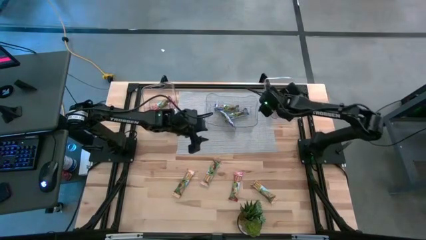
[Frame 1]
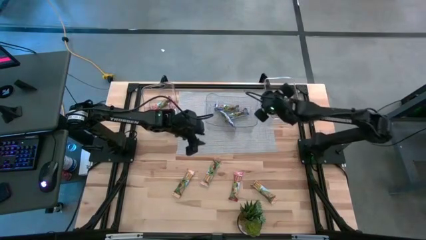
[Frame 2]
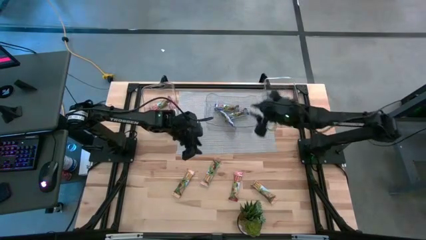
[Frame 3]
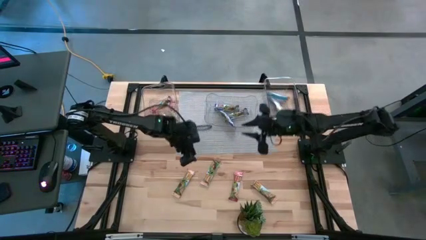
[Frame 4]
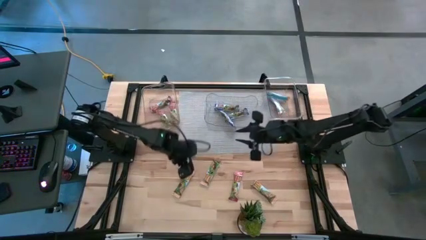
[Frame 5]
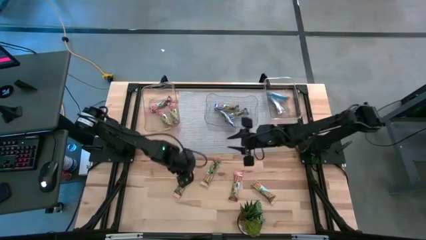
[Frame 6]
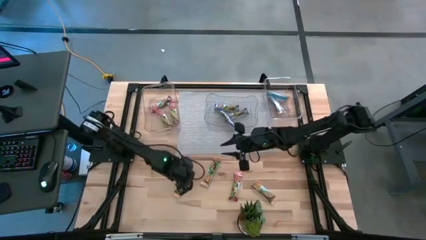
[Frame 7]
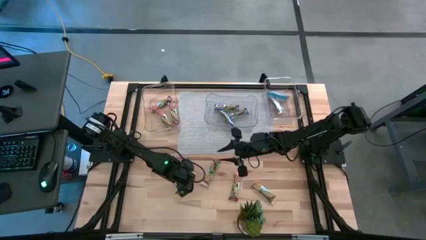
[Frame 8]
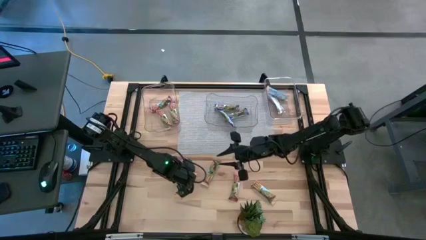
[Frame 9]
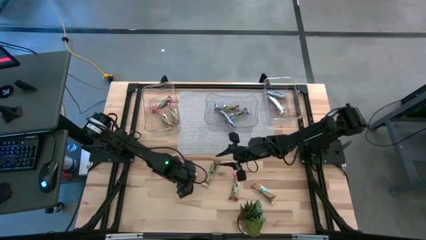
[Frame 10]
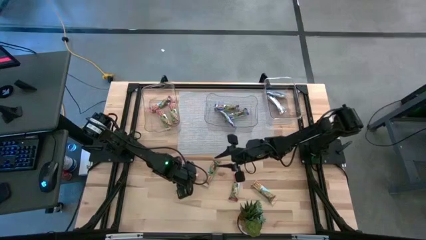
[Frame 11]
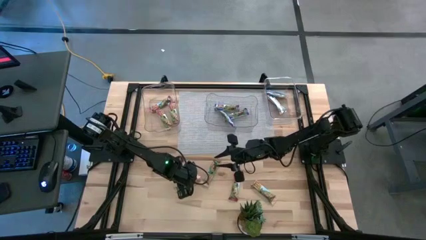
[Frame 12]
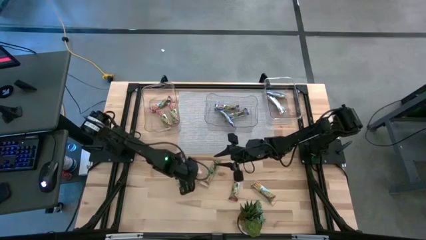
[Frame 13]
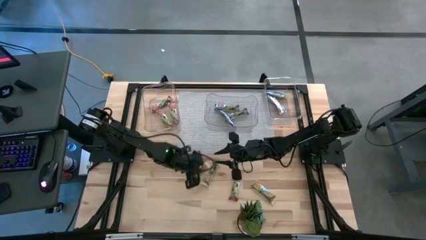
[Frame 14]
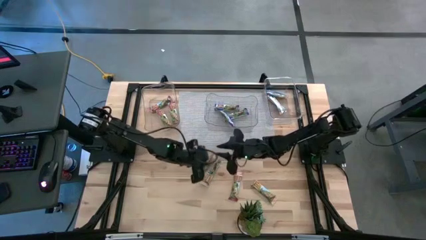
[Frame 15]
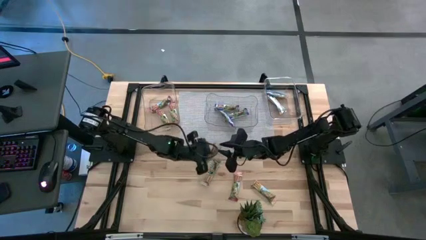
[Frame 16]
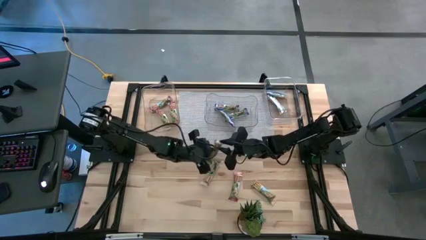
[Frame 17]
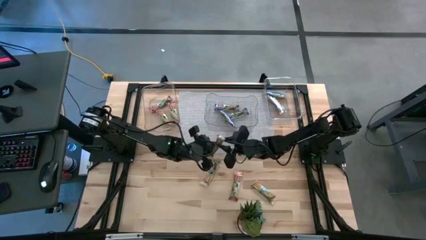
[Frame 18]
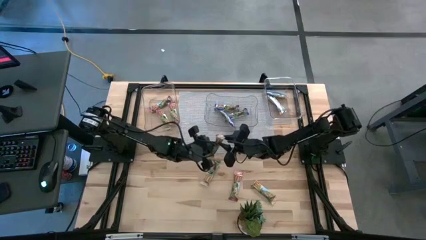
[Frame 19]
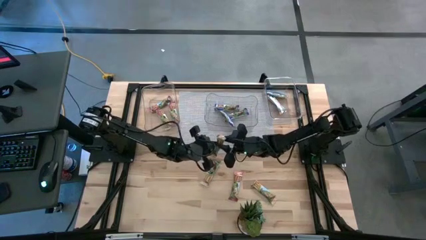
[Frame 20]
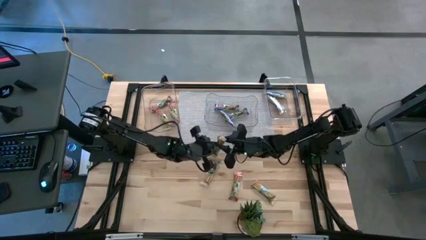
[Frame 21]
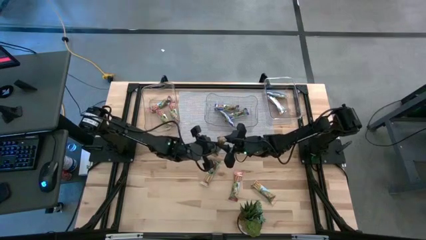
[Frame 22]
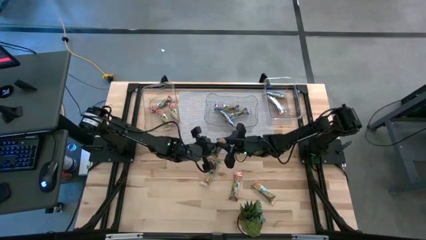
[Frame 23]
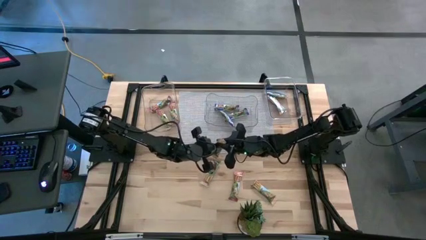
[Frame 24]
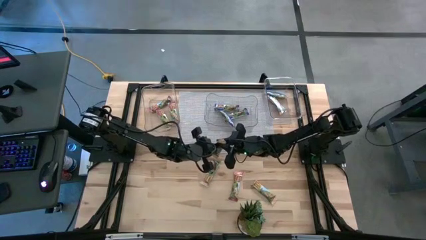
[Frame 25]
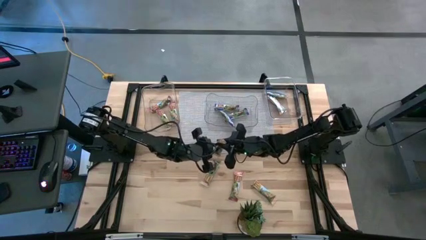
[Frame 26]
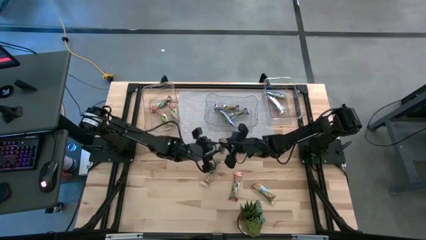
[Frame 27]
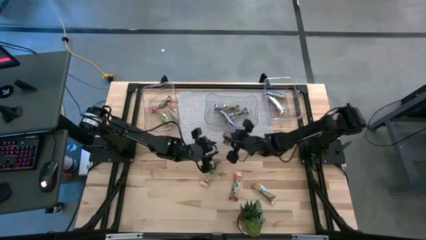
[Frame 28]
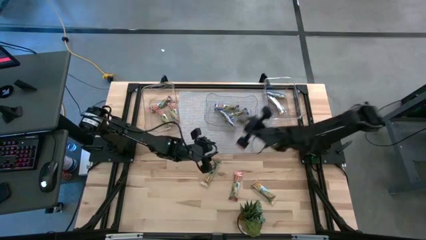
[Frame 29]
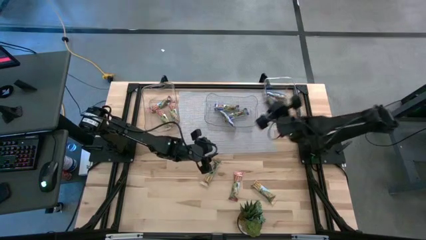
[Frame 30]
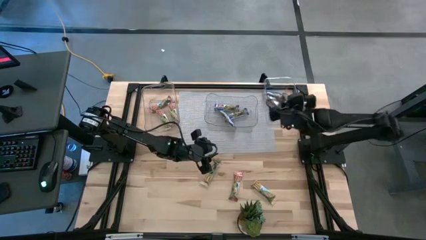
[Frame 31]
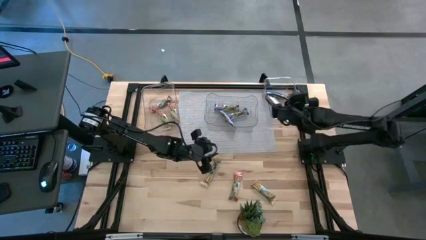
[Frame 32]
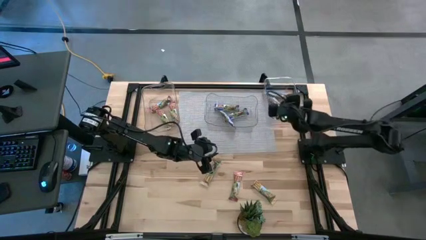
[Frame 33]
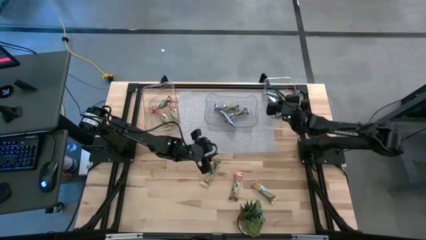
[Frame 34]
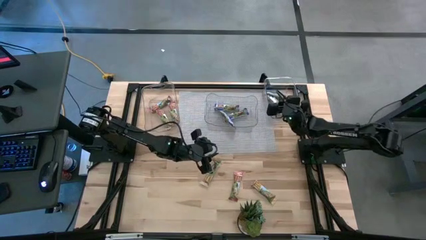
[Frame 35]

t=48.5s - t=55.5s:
Task: Pick and place Granola Bars by type
Put the yellow granola bar into the right transparent bin

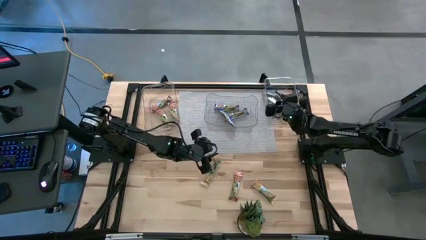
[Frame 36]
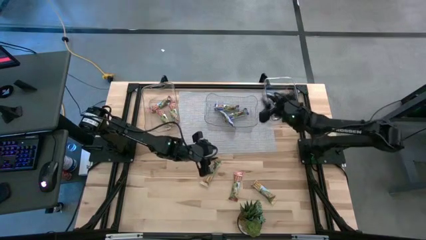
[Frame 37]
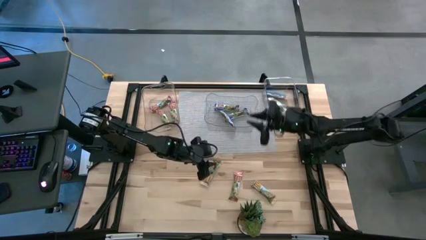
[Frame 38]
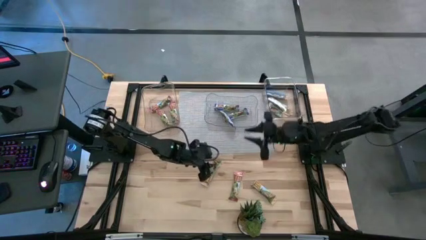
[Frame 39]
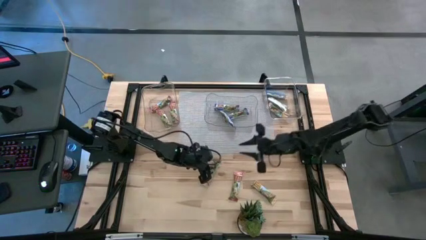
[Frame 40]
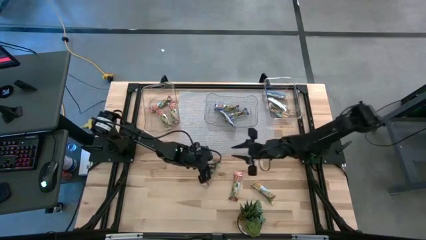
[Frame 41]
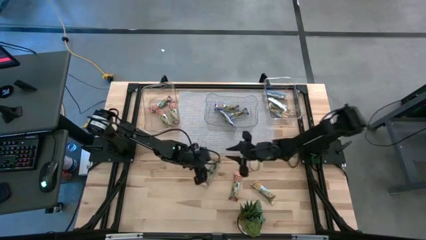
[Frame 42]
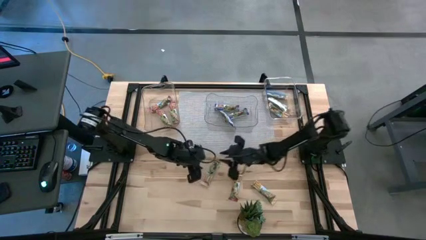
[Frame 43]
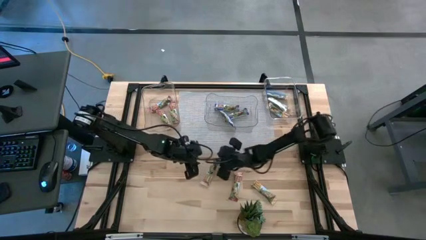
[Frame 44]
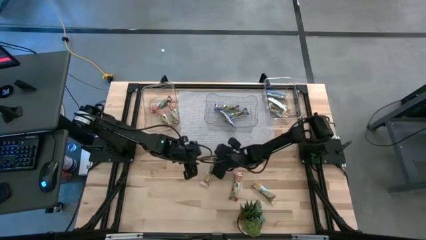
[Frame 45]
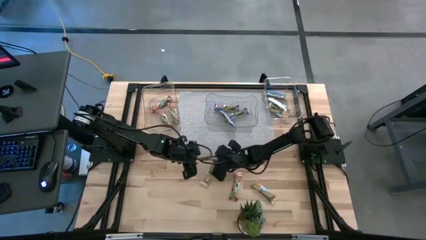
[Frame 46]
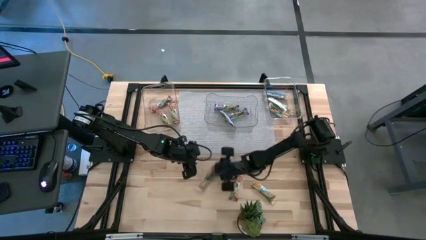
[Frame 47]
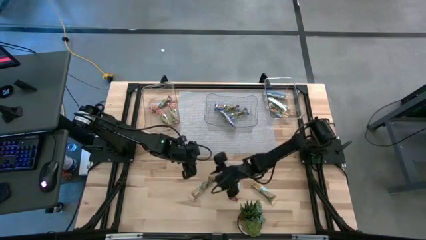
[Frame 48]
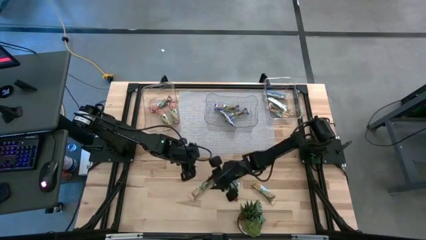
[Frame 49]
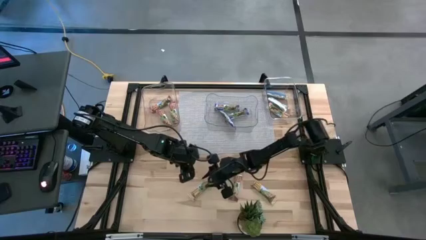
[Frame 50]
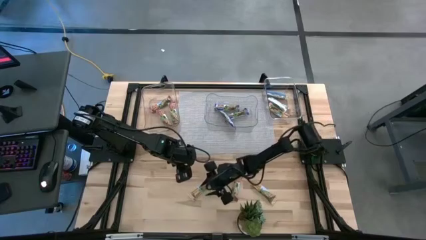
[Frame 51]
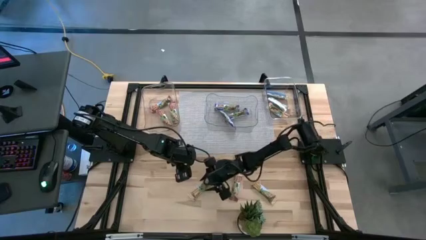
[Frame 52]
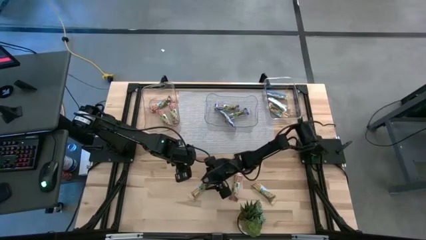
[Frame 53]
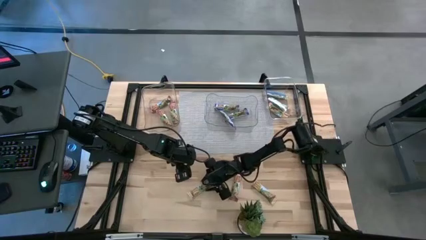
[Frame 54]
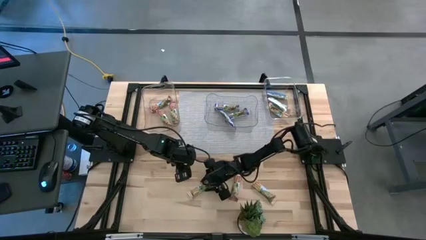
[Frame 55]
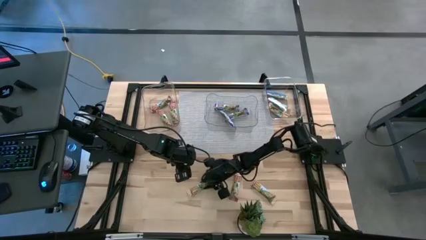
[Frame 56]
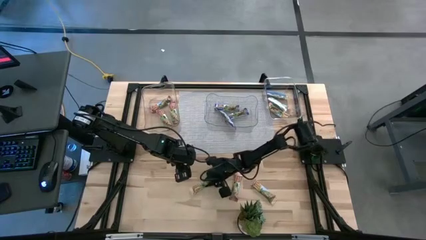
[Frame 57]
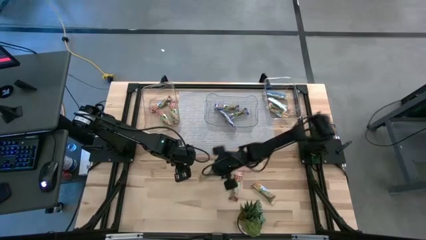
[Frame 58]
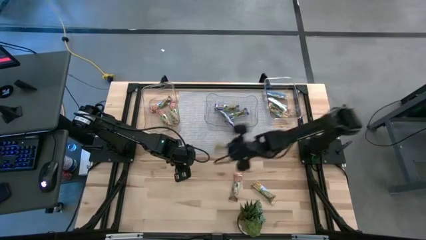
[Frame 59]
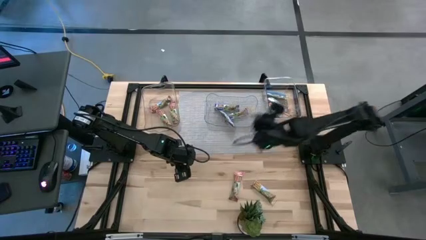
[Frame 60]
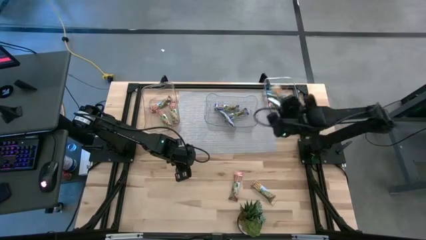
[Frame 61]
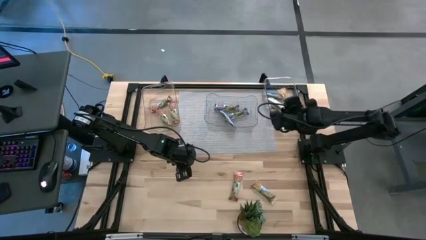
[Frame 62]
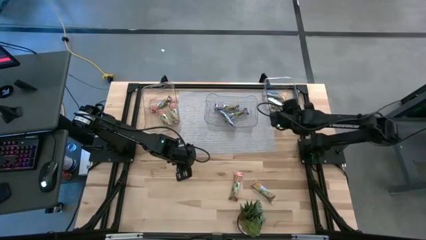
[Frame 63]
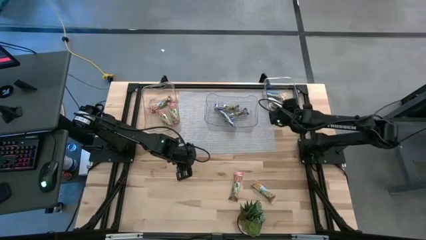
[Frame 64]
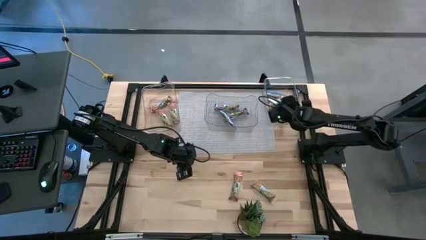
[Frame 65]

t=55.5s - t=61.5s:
Put the yellow granola bar into the right transparent bin

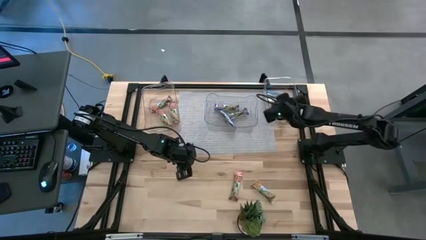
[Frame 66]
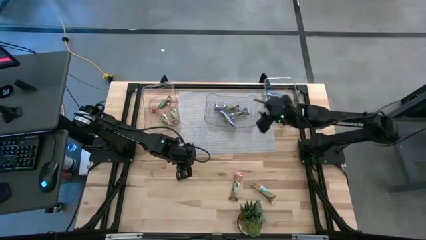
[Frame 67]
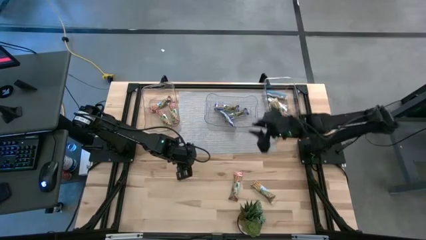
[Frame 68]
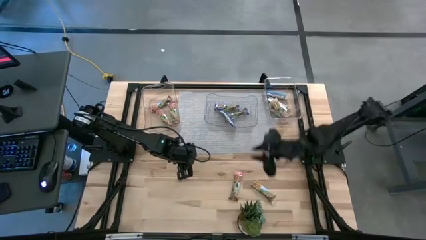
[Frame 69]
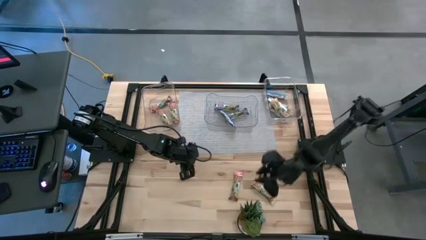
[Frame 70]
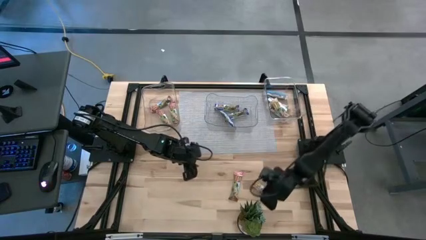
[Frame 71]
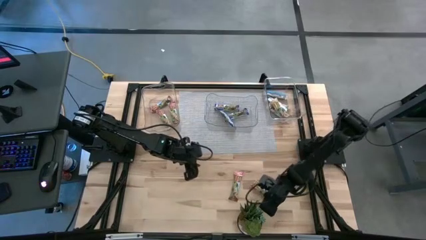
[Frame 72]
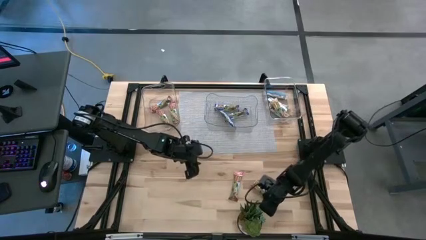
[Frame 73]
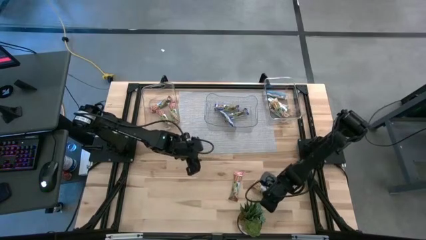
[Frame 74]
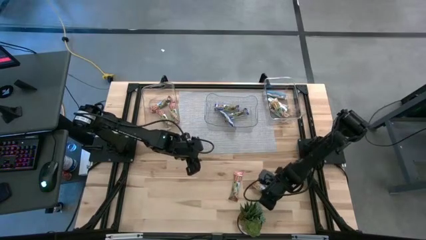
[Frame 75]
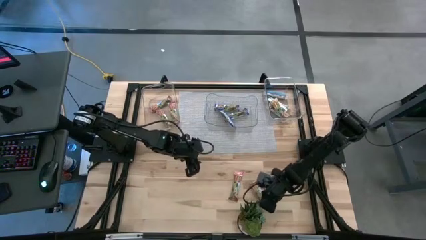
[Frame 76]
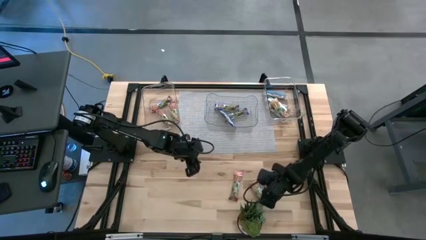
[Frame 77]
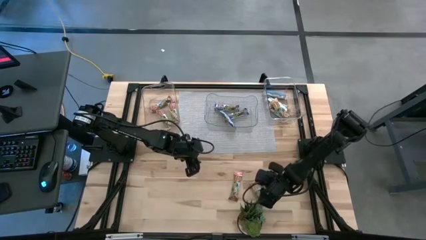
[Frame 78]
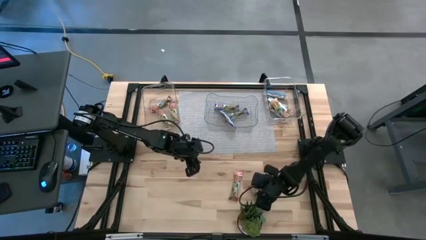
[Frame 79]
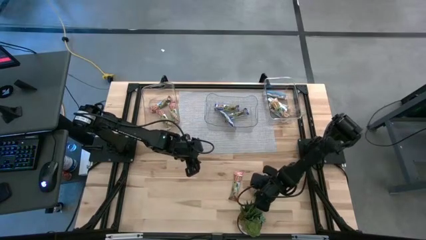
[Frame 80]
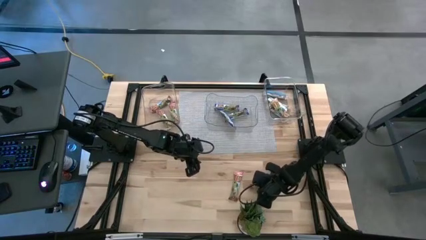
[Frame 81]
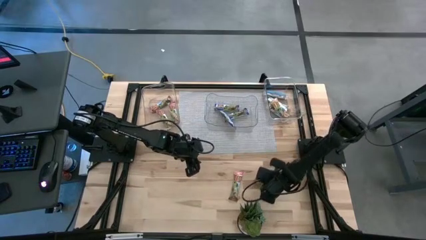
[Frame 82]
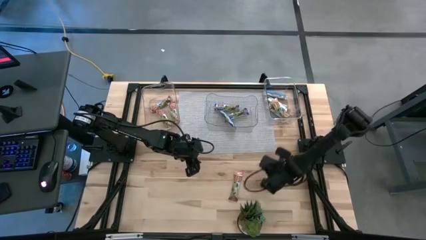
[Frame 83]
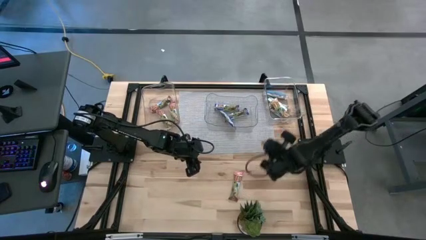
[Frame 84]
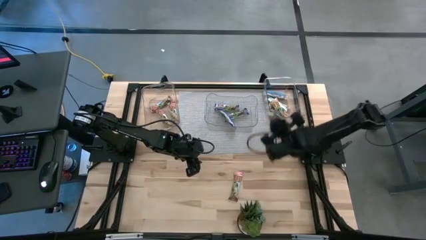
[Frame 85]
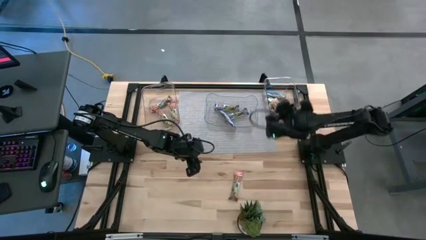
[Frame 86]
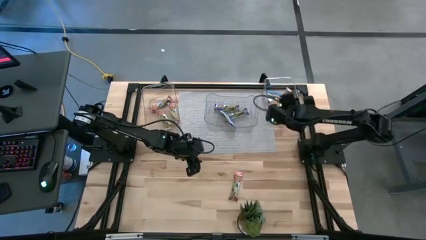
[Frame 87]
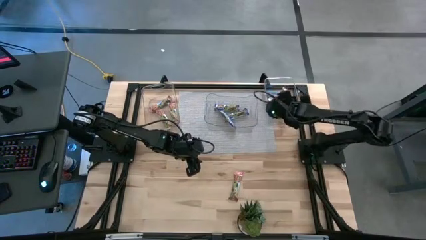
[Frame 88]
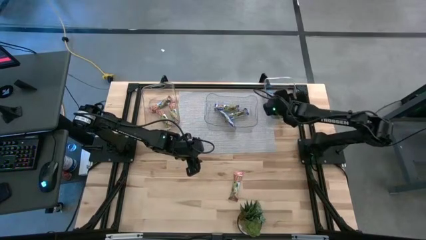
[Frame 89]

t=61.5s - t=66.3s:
Put the yellow granola bar into the right transparent bin
